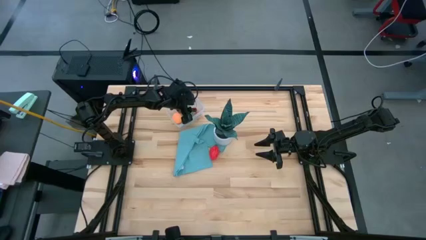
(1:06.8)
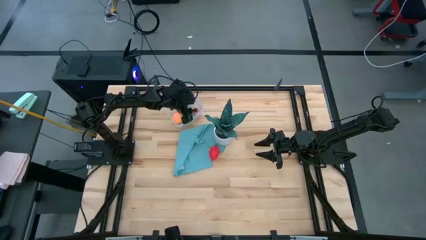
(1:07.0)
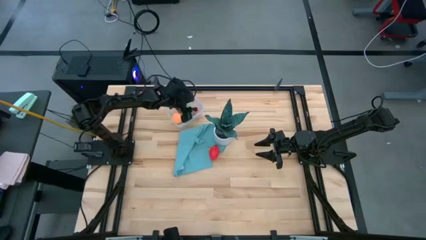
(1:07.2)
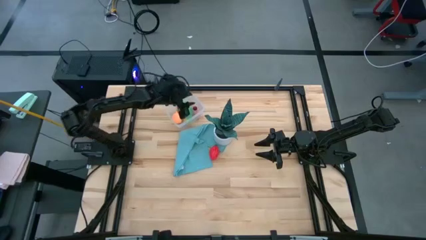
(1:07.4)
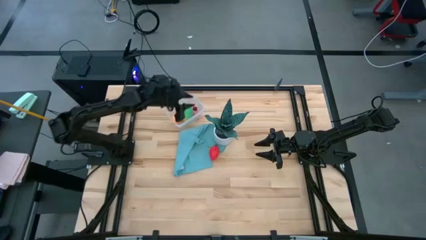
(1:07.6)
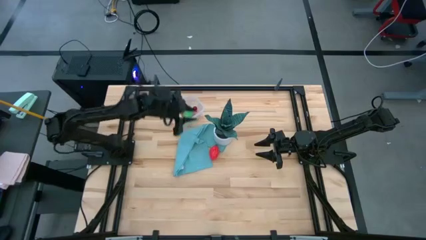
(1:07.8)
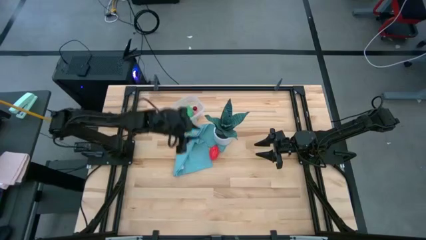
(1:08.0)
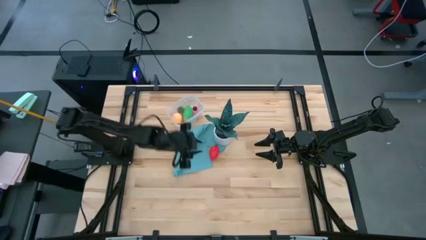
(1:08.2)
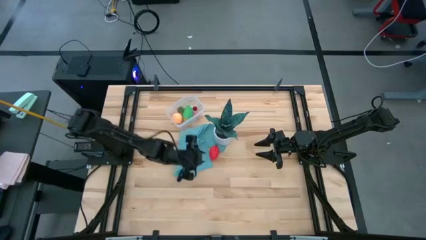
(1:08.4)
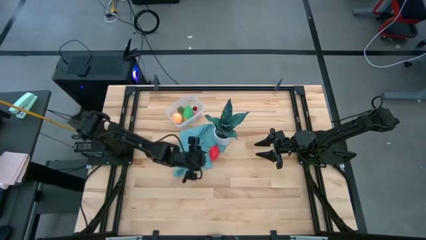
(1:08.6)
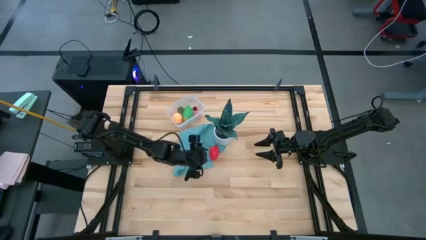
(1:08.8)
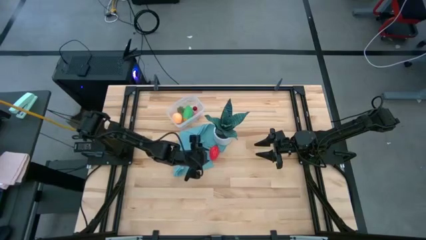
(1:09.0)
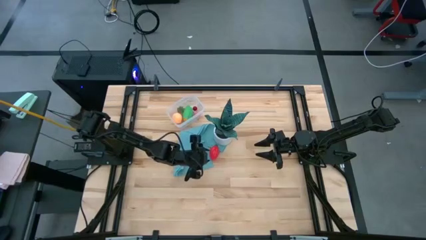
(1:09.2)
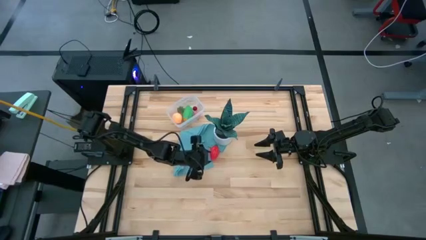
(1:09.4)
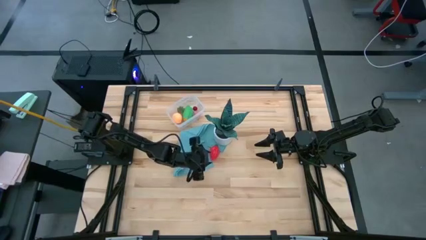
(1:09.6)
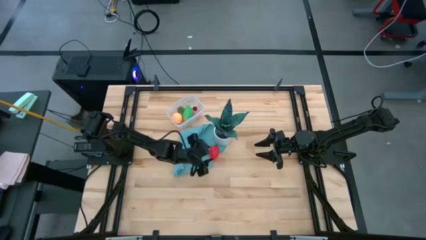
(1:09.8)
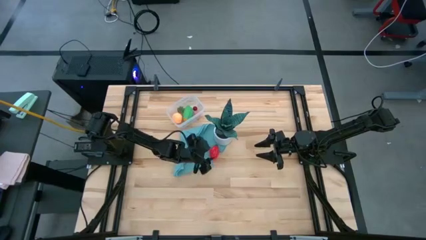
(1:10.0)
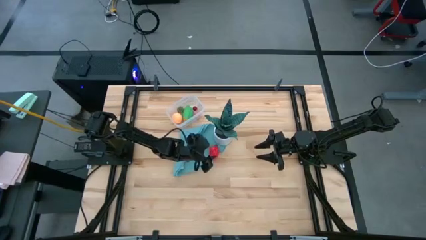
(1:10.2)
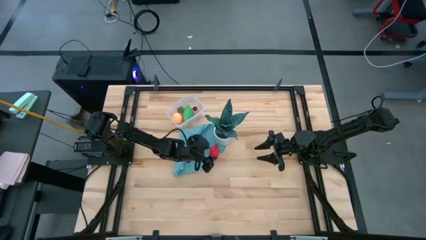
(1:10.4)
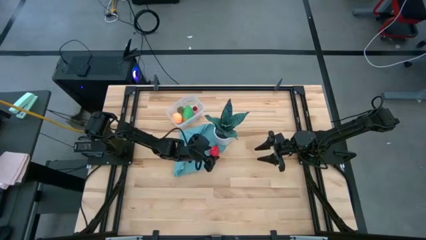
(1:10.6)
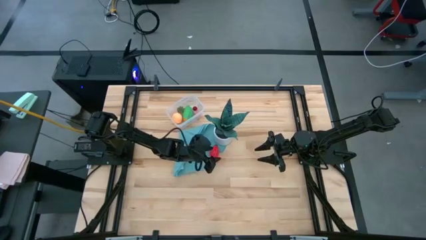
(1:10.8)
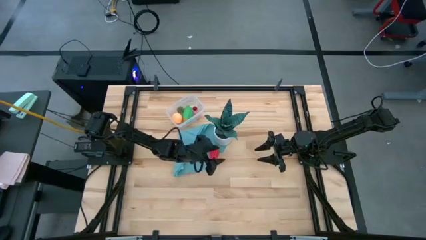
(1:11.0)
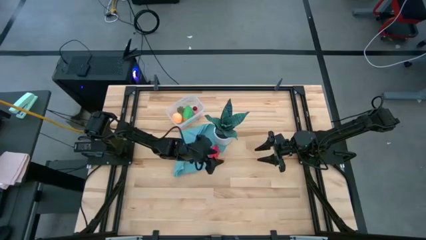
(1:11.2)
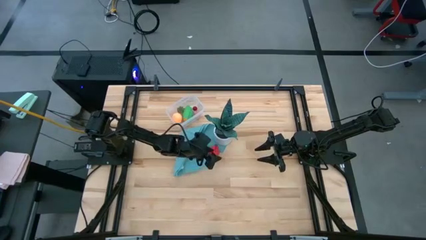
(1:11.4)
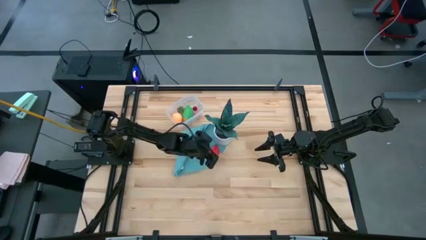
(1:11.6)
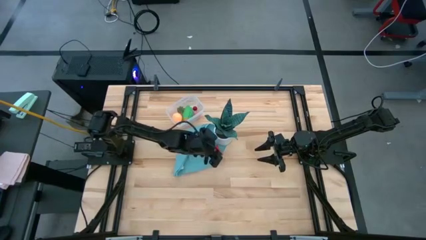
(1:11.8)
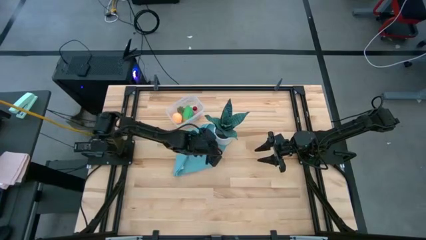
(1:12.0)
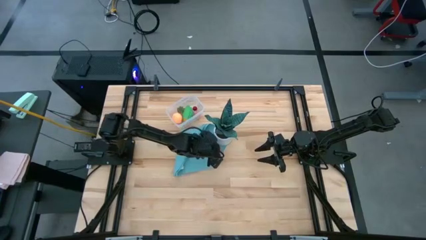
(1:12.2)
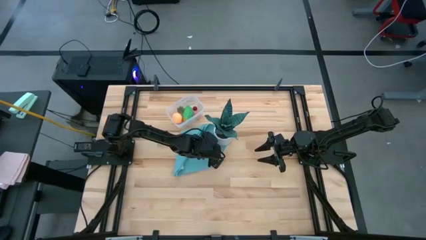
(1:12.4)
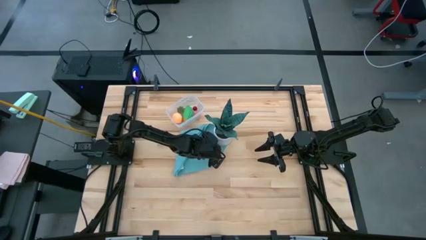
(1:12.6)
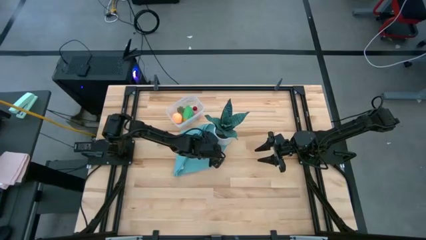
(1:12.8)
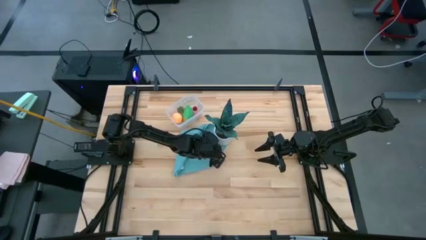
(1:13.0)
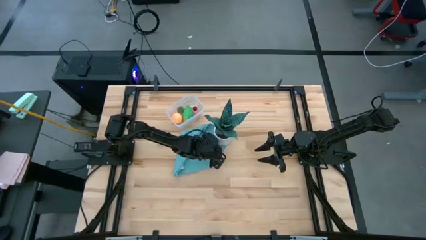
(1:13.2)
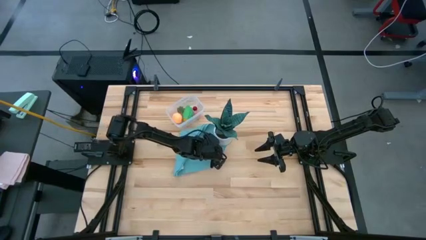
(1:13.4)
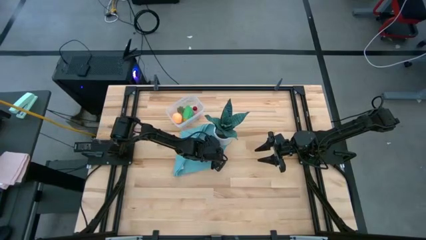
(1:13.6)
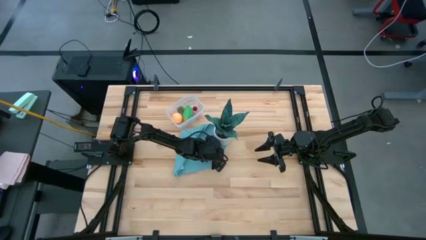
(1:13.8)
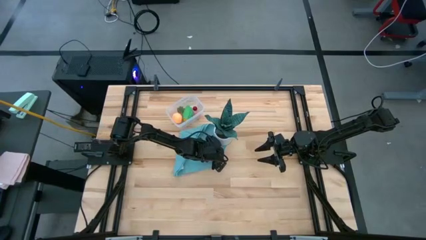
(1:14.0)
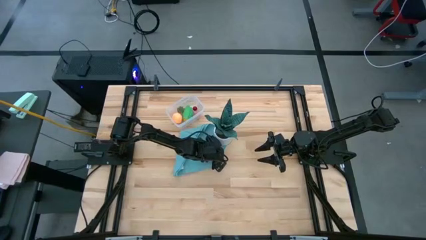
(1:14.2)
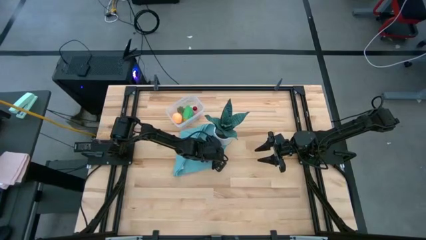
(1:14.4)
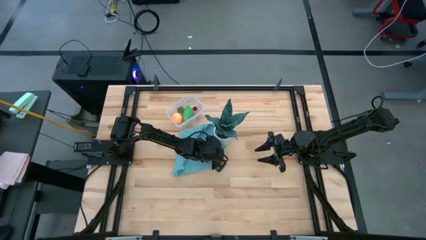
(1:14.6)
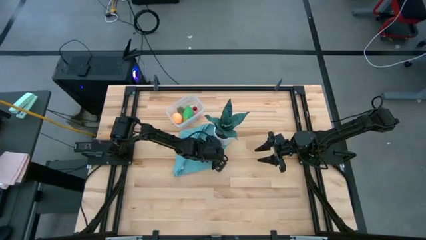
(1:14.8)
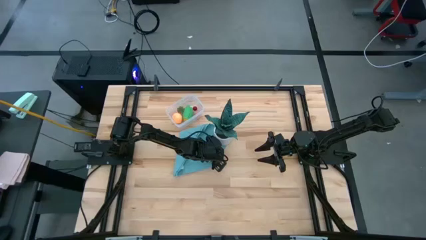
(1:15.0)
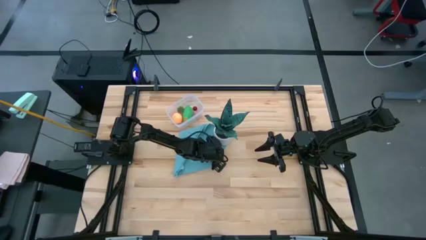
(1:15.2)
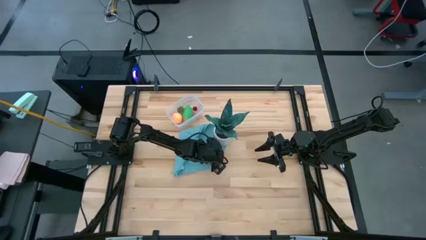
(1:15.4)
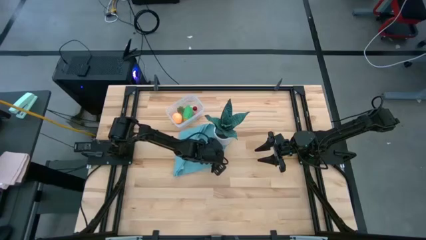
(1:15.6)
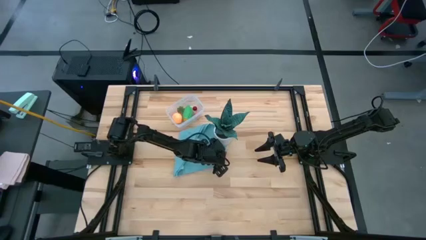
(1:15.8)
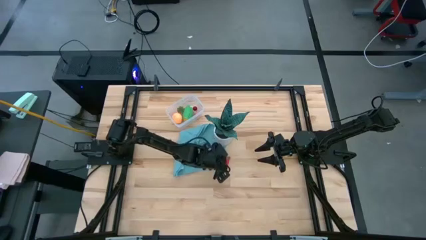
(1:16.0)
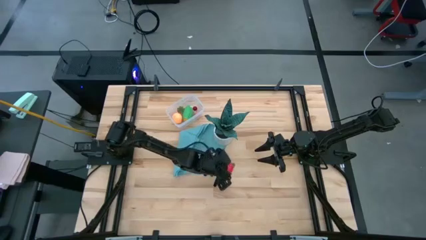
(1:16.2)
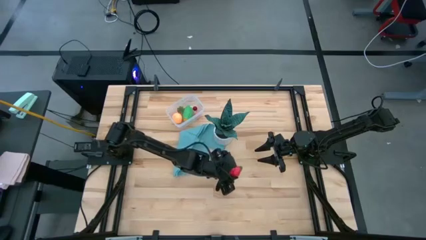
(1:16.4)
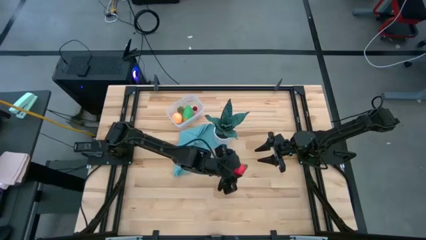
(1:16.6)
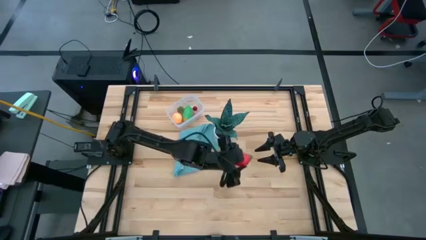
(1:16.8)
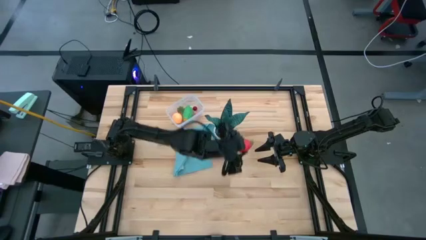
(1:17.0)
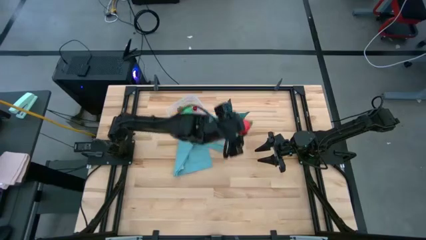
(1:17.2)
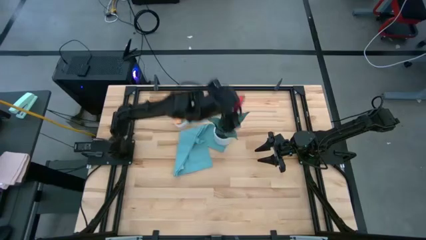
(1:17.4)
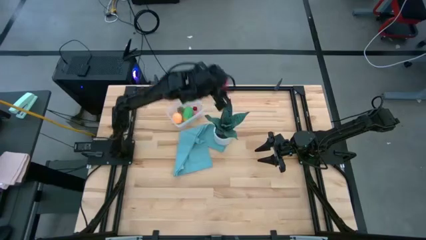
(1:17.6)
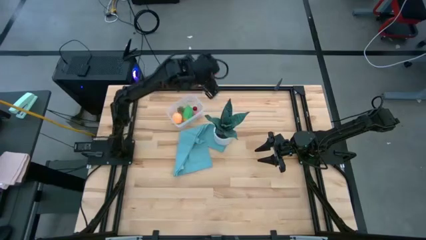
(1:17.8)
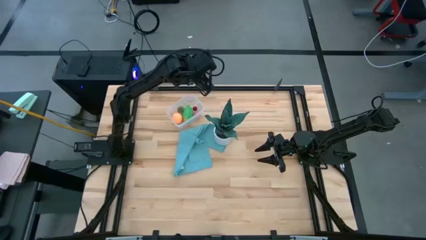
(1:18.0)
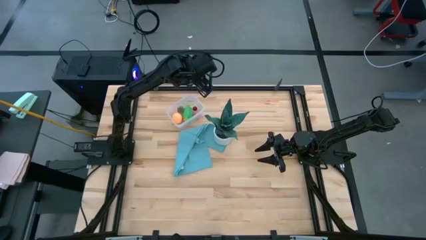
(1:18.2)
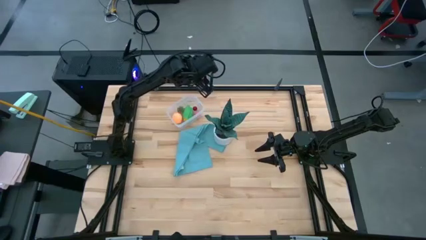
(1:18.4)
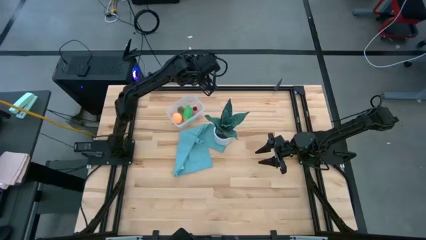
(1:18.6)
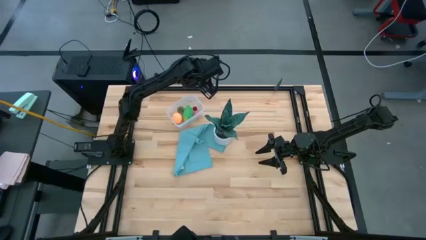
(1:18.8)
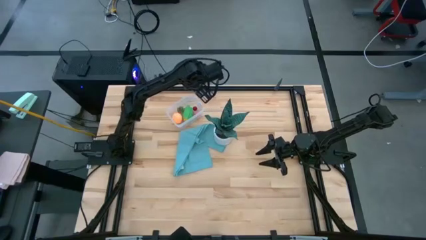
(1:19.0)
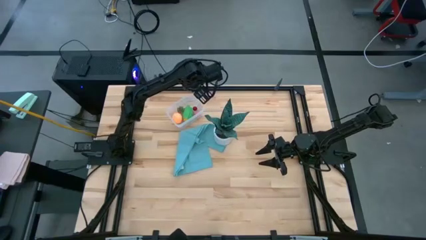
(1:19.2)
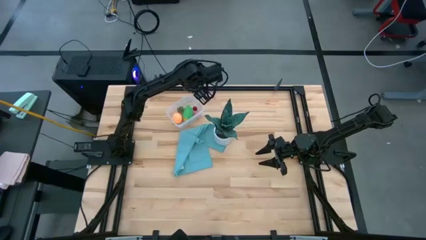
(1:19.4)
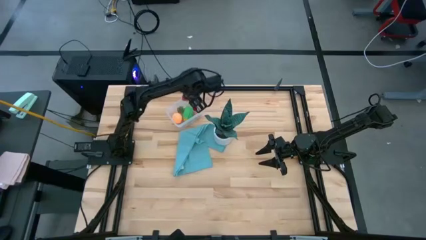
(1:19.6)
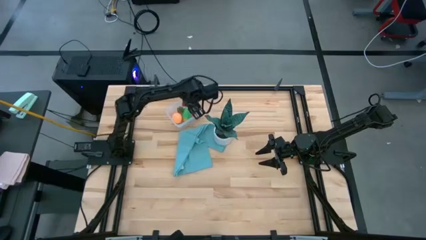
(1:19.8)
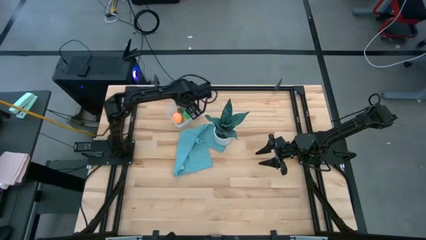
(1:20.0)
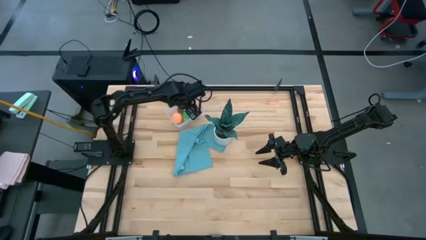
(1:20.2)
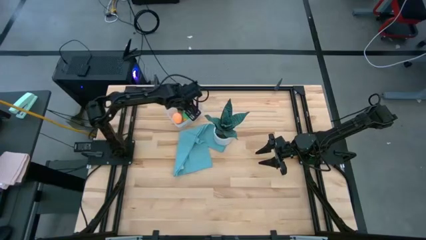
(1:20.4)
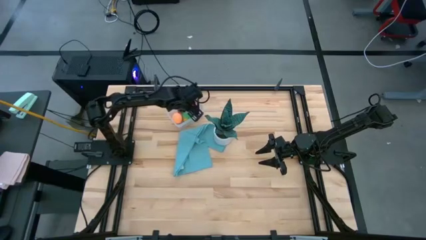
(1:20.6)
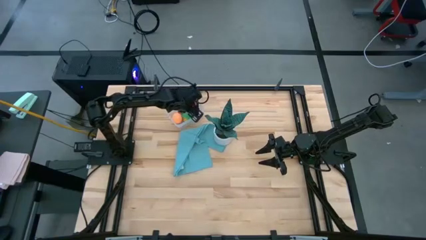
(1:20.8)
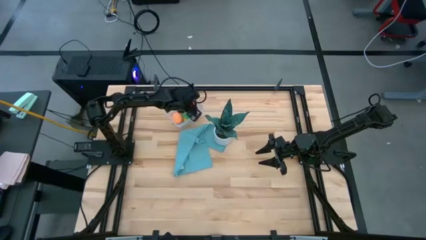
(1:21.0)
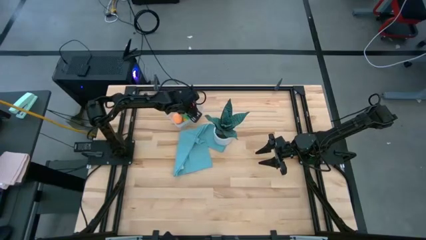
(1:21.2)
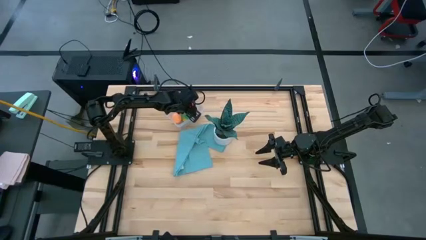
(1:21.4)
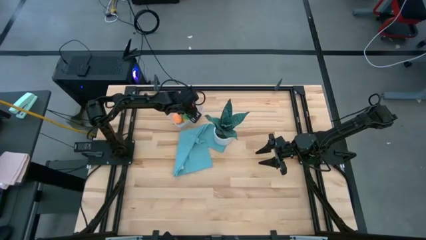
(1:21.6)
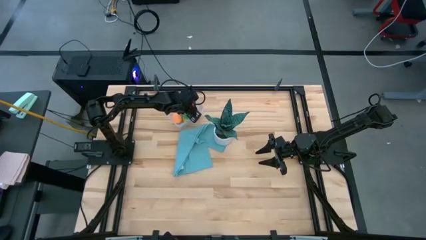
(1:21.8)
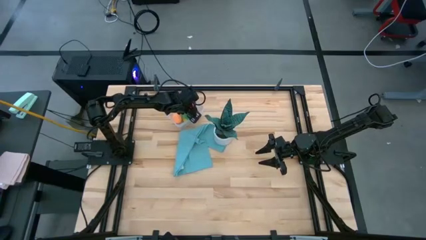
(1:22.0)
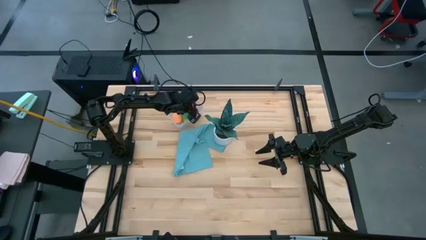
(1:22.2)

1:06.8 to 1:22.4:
Task: Pick and placing Produce into tupperware
Put the dragonfruit into the transparent bin
